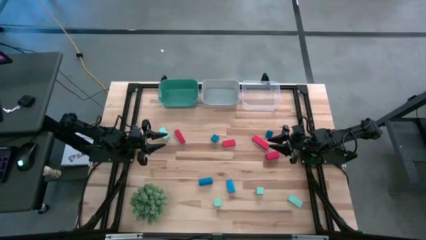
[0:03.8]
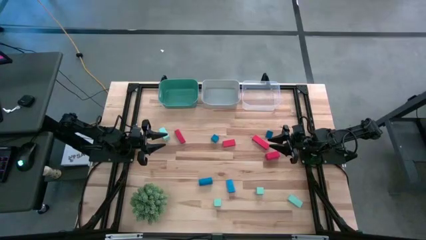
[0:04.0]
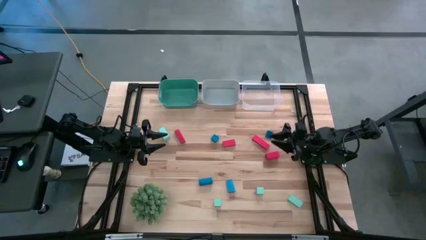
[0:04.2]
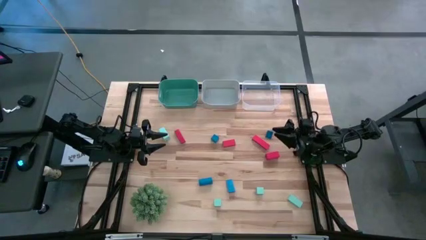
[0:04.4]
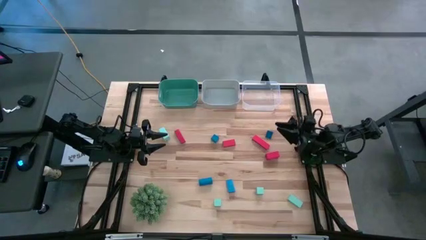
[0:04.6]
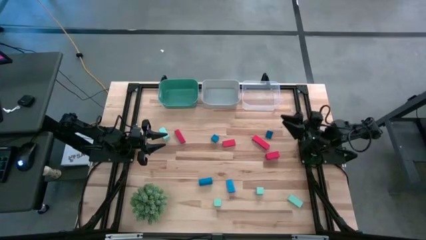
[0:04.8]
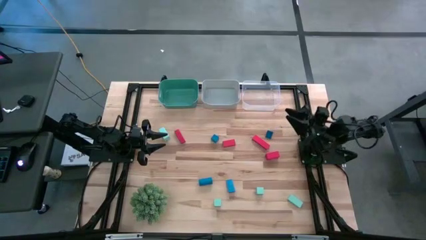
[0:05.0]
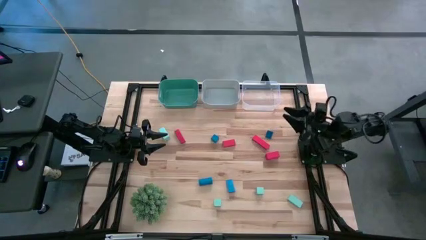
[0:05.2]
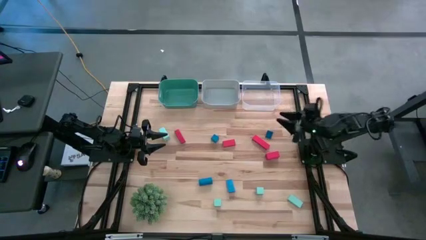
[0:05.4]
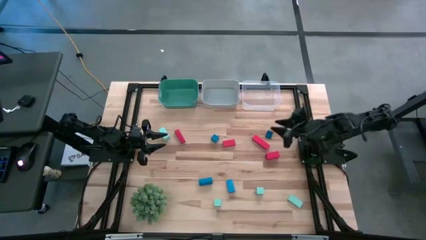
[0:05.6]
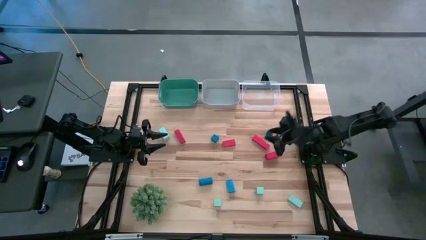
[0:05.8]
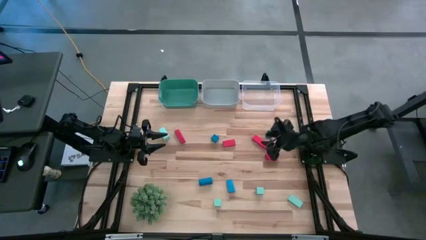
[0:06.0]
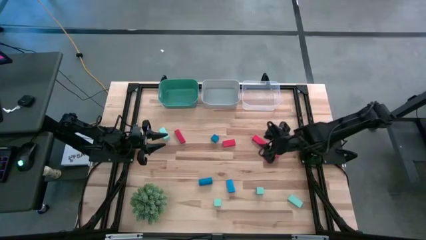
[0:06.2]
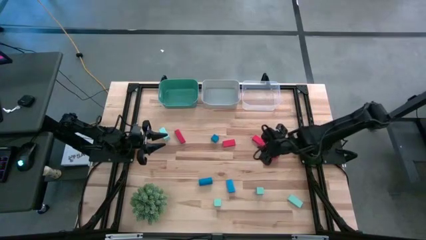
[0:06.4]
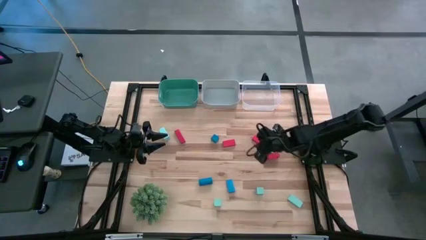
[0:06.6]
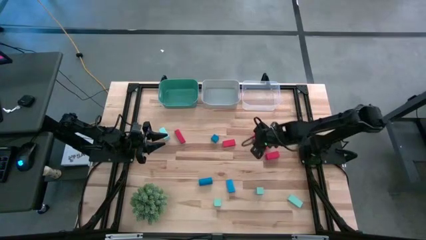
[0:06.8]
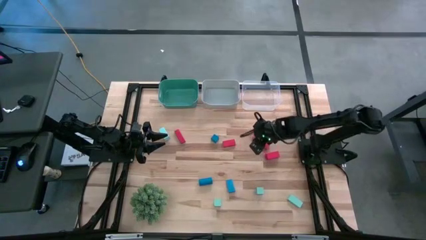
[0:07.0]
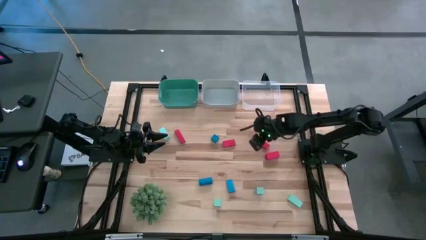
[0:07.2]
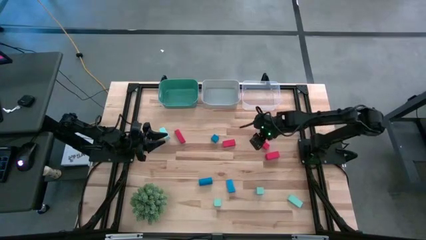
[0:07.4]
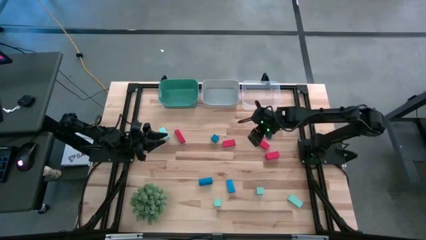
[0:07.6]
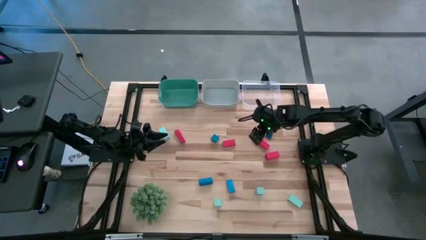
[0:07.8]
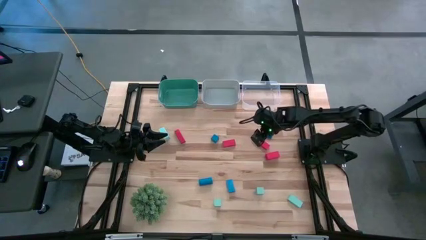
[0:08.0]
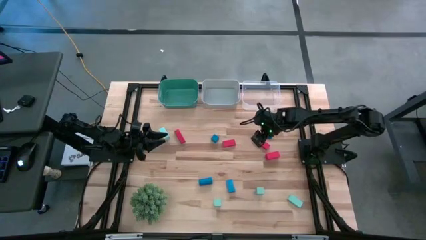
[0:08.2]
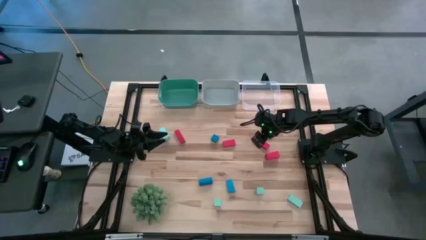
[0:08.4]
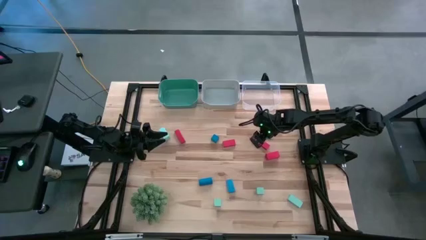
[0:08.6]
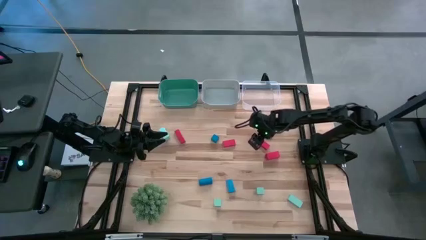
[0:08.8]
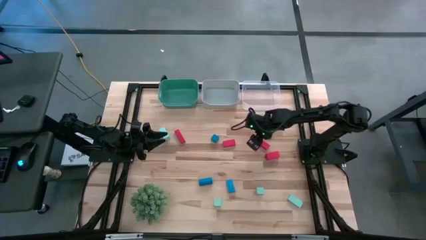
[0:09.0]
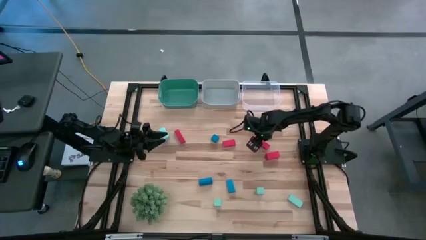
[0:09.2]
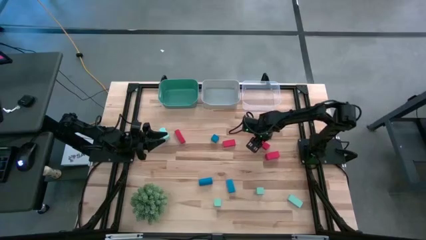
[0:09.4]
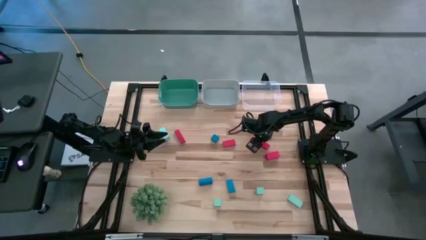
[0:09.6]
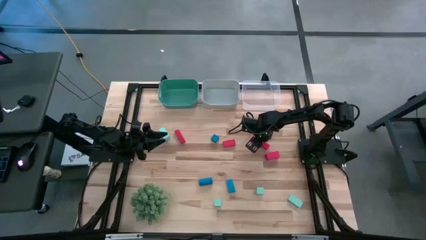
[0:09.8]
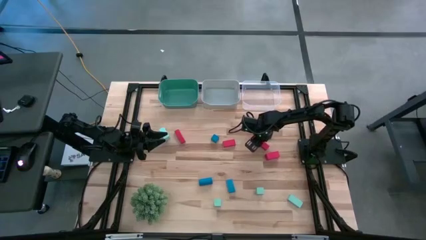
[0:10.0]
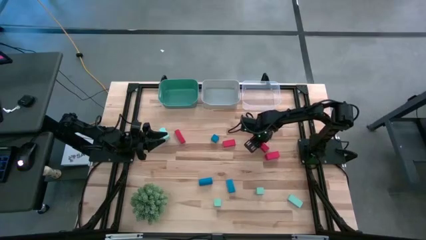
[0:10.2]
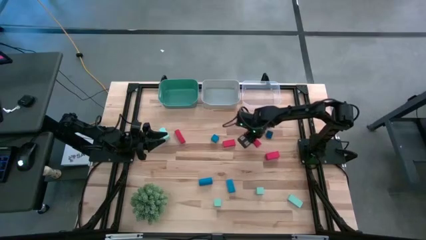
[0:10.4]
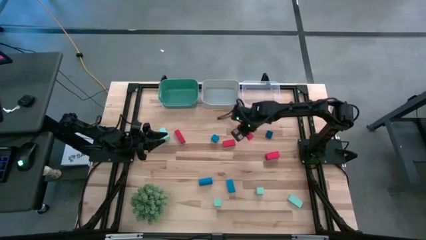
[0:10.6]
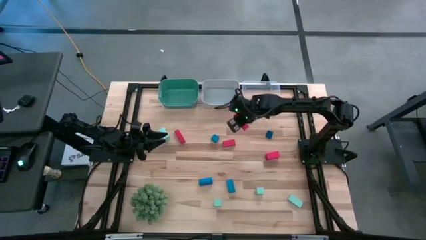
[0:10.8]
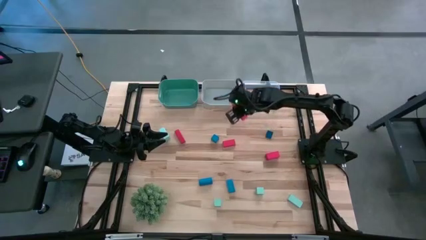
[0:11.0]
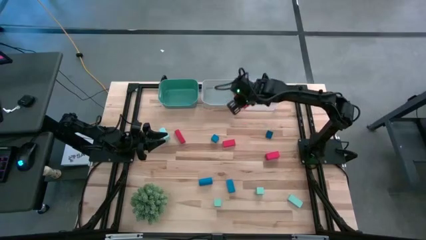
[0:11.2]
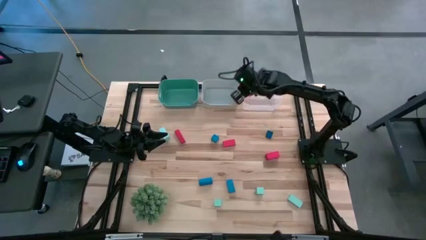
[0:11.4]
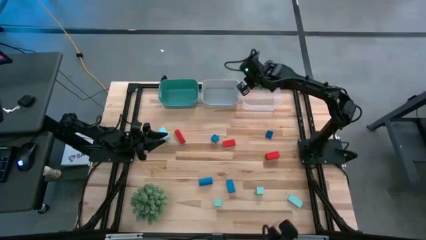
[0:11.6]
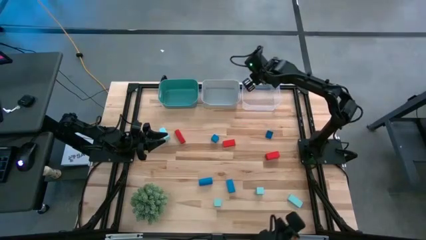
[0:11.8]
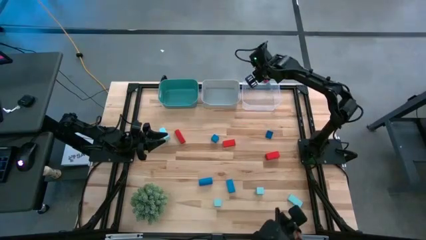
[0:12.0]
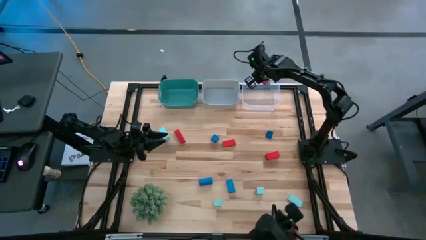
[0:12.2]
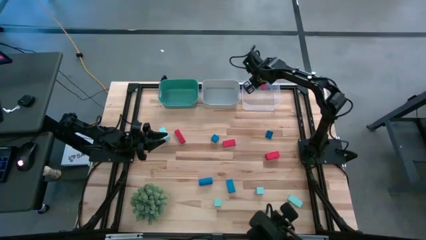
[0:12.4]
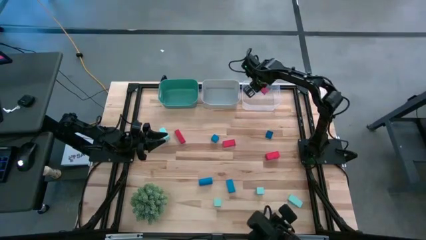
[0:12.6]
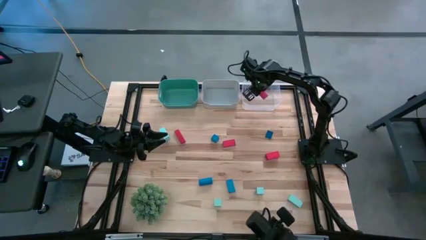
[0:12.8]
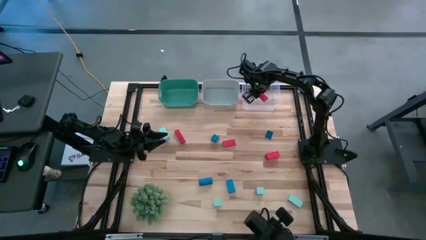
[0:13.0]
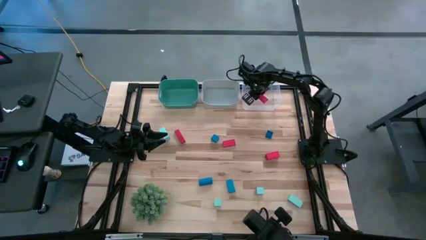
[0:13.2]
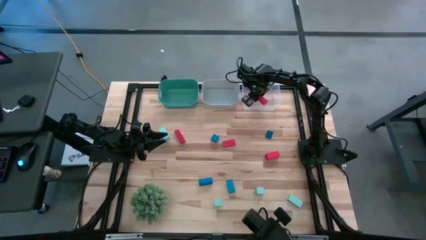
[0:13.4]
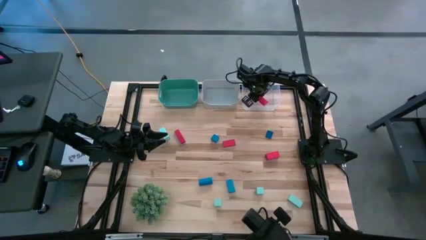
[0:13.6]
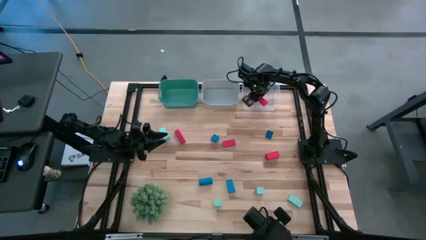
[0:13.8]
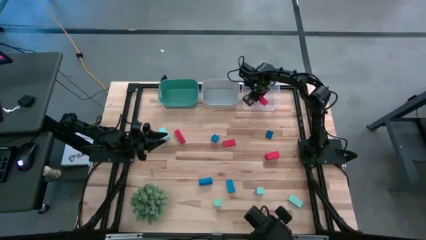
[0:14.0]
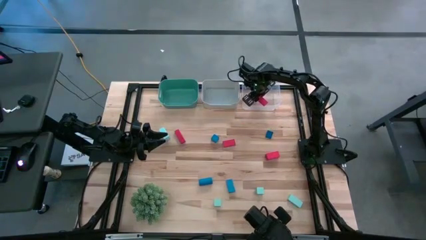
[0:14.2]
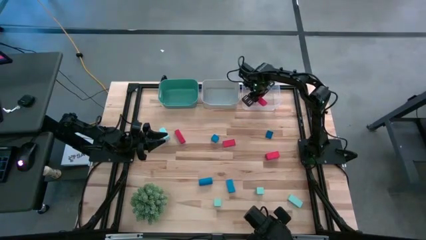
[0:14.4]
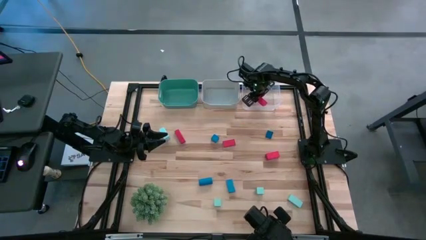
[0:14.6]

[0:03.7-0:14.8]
Task: Sort & place blocks by color
Put the orange block into the transparent bin
